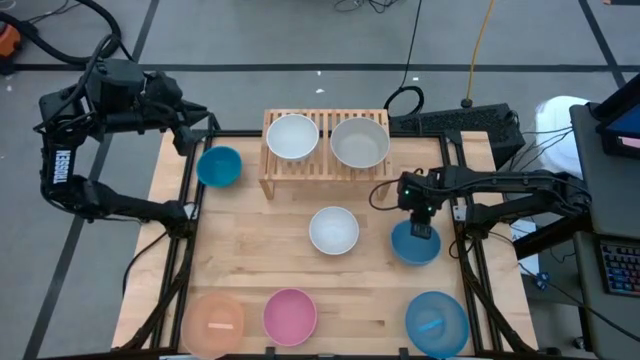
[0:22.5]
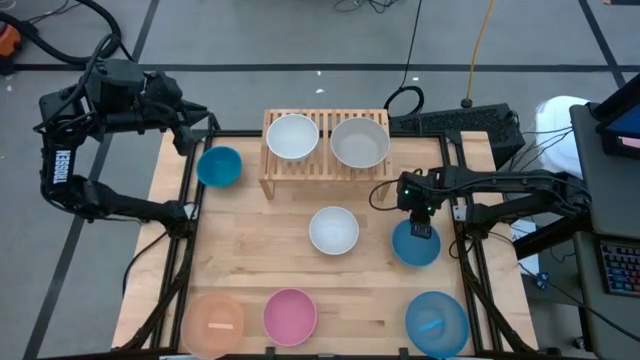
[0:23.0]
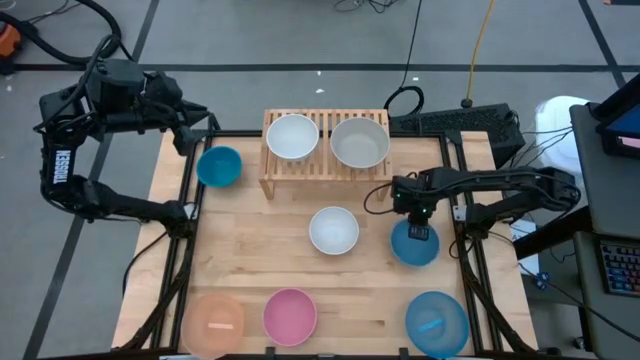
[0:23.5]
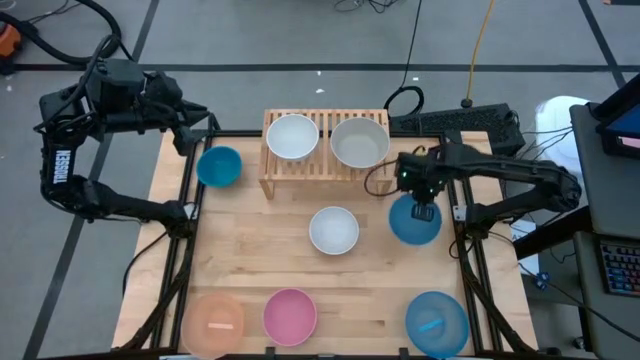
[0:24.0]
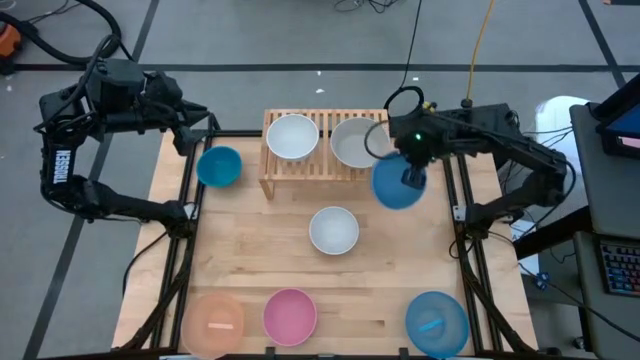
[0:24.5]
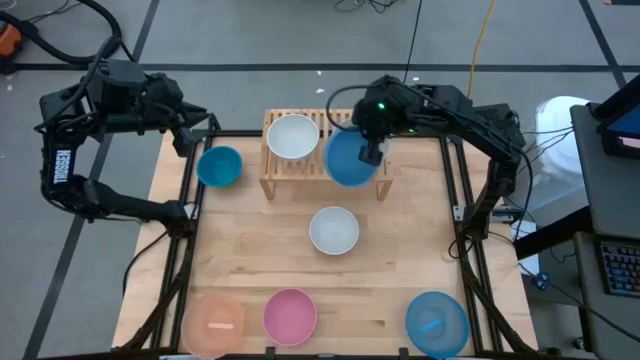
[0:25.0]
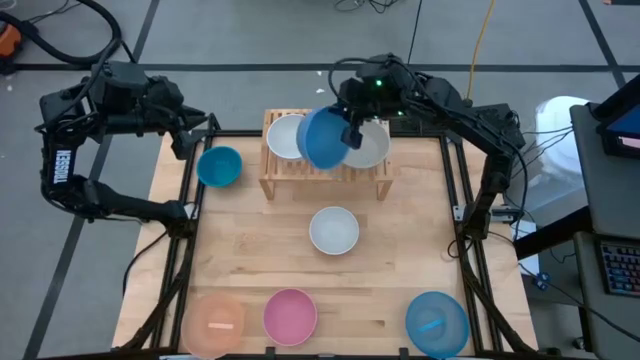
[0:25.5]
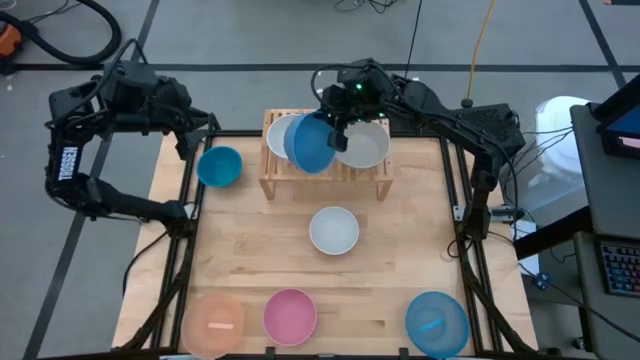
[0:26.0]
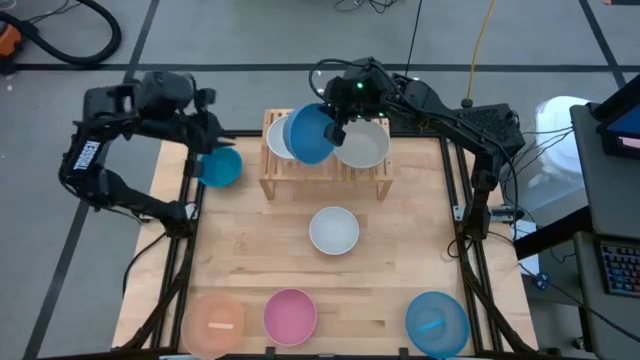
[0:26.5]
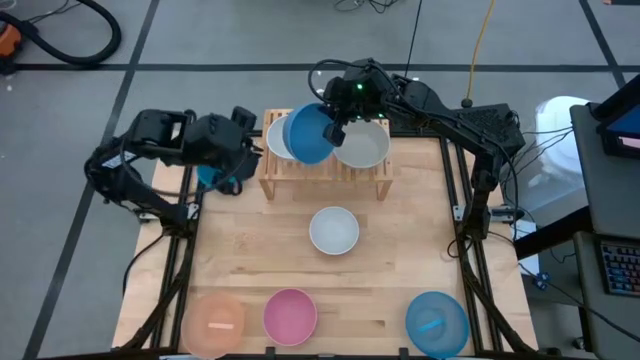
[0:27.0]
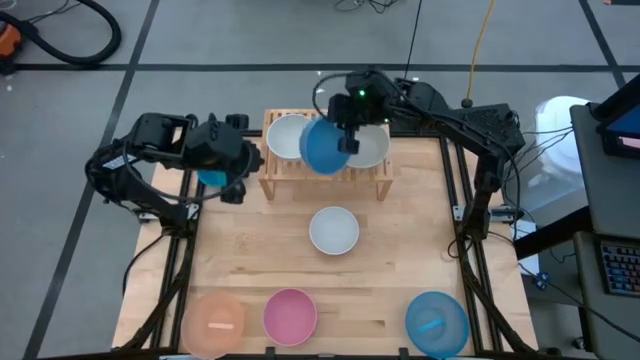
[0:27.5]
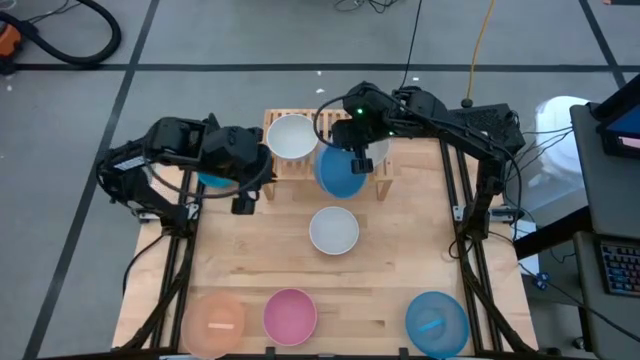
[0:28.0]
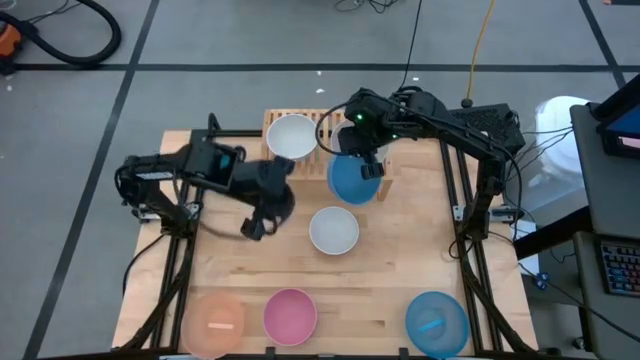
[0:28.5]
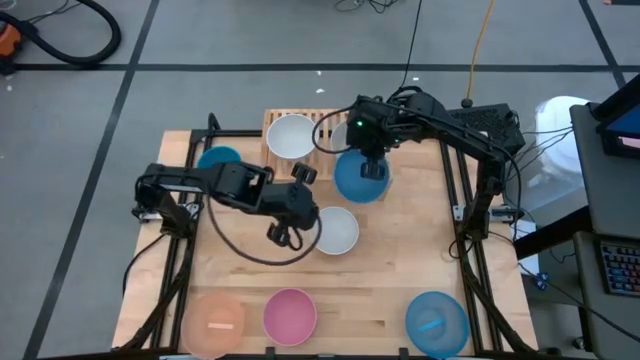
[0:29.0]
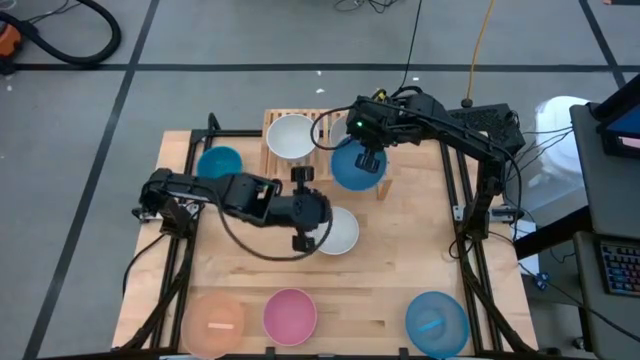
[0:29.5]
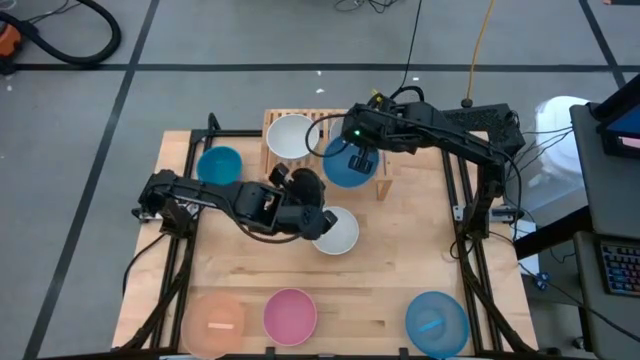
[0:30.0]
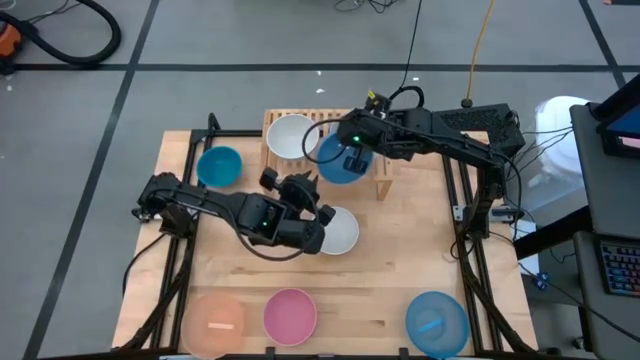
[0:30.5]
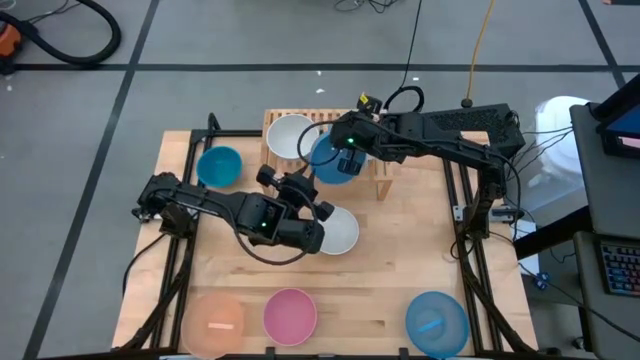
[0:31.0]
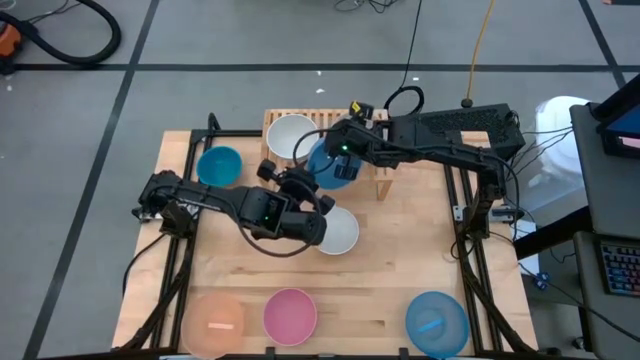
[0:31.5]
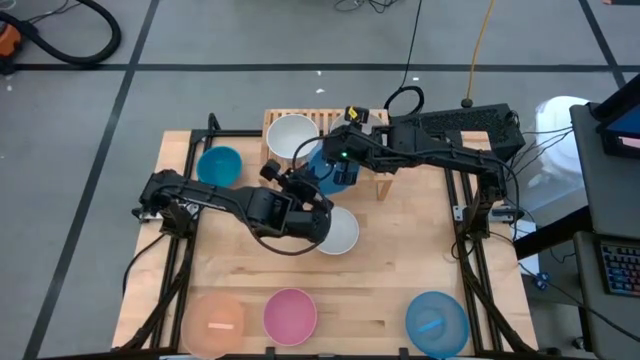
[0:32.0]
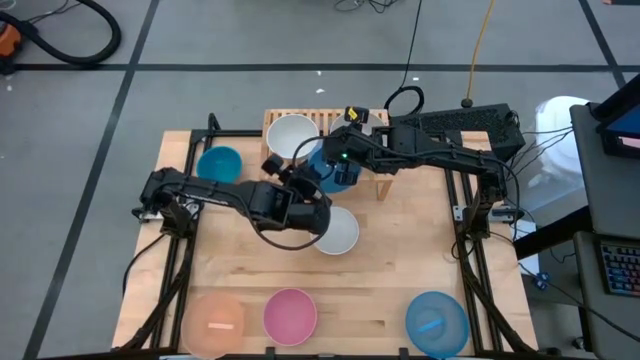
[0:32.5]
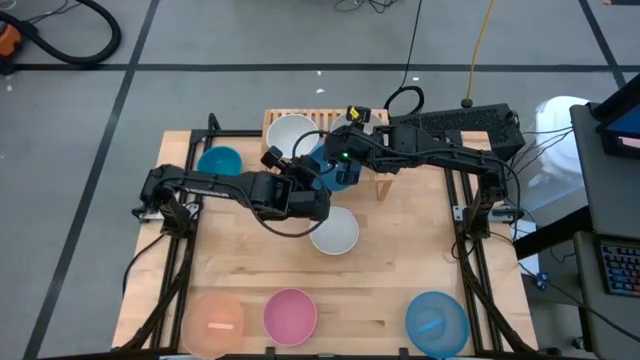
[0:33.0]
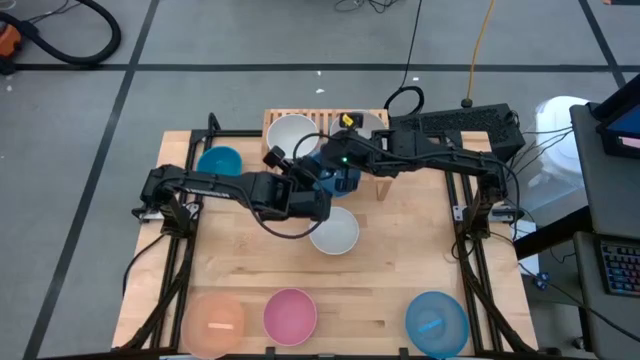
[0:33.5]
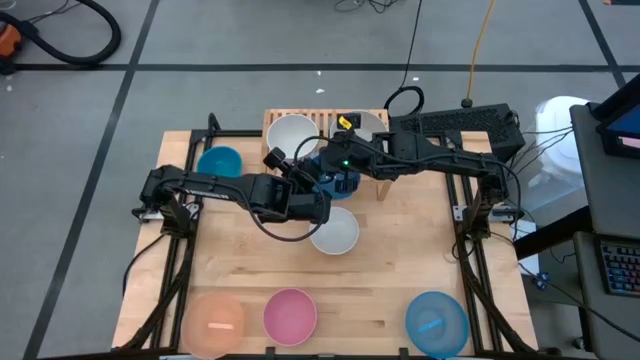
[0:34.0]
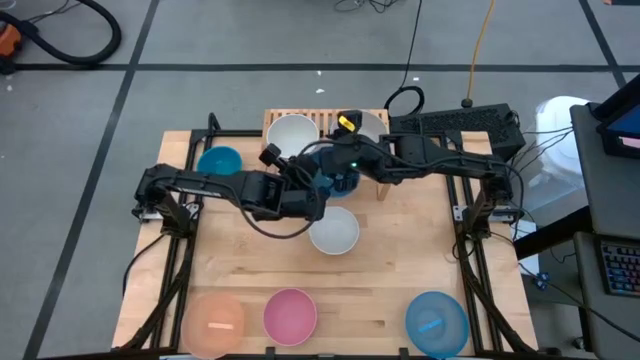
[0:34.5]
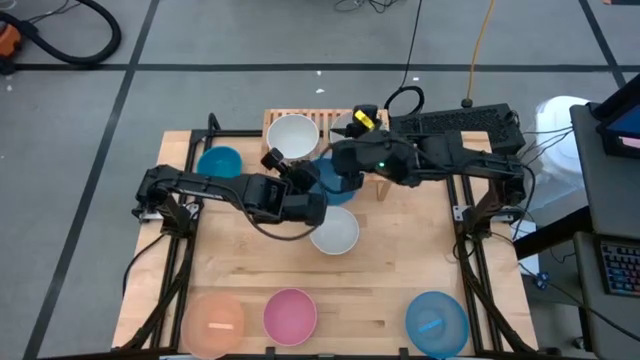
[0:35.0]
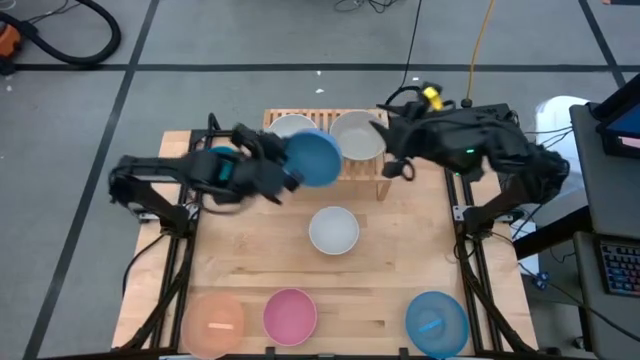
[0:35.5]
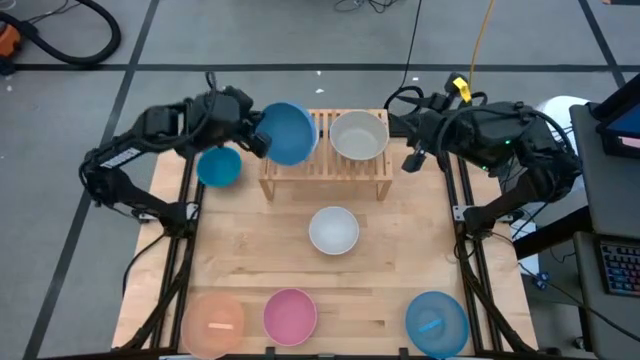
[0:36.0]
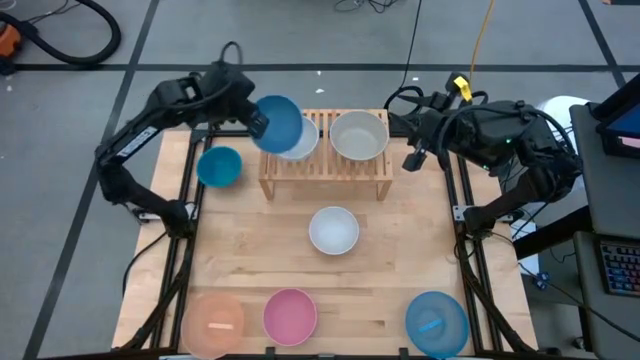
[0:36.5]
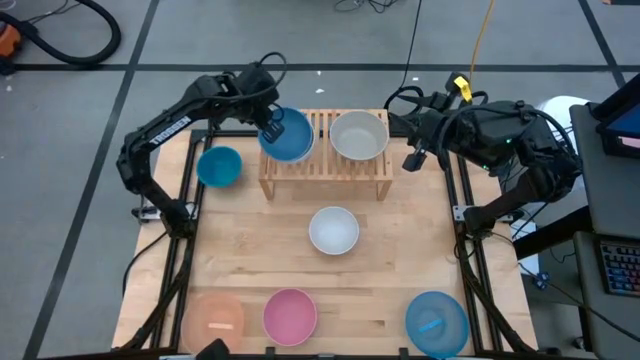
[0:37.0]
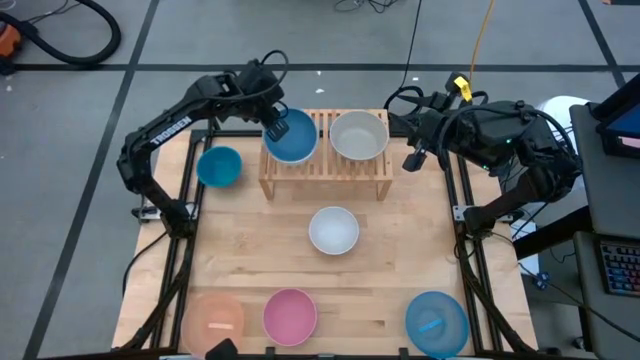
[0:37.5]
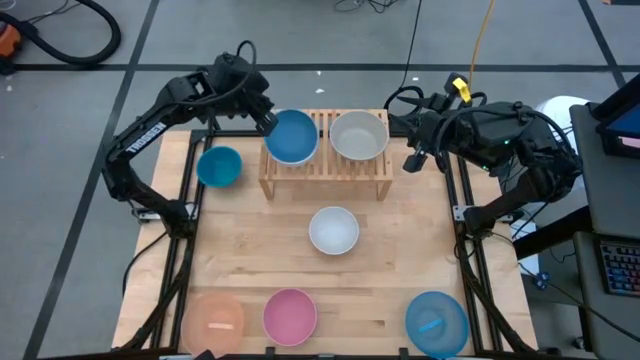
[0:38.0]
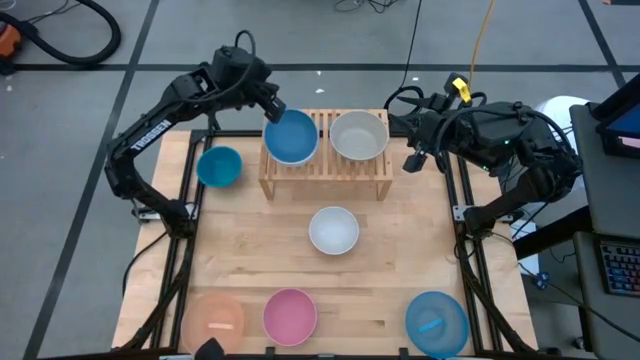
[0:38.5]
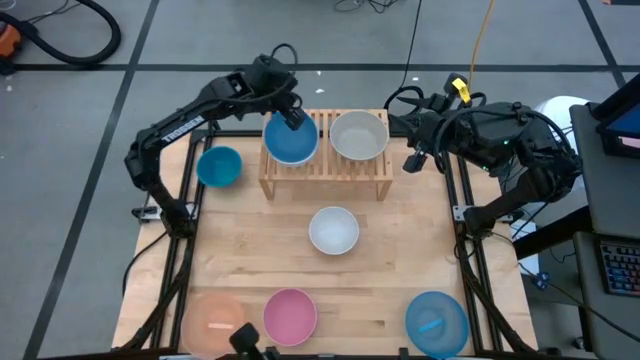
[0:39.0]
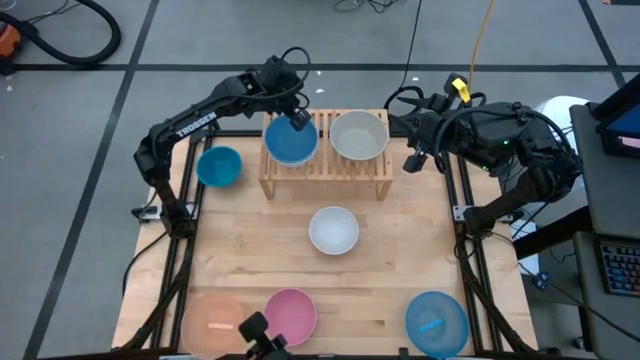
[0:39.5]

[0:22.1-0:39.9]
Task: Place and stack bowls onto a shelf
Stack the bottom small blue bowl on top of the small white bowl on the shelf

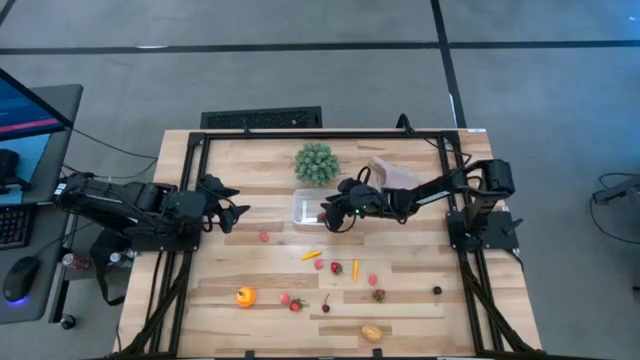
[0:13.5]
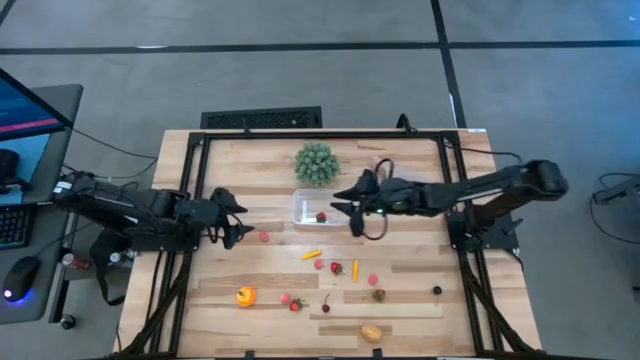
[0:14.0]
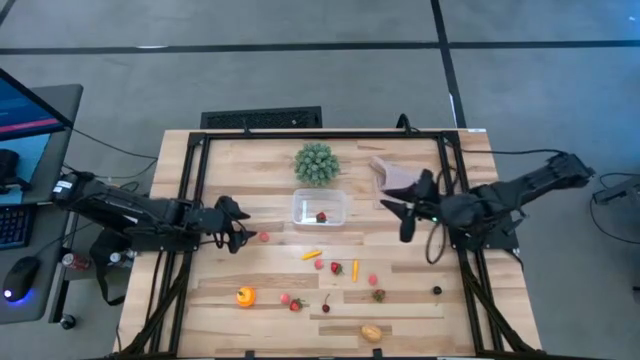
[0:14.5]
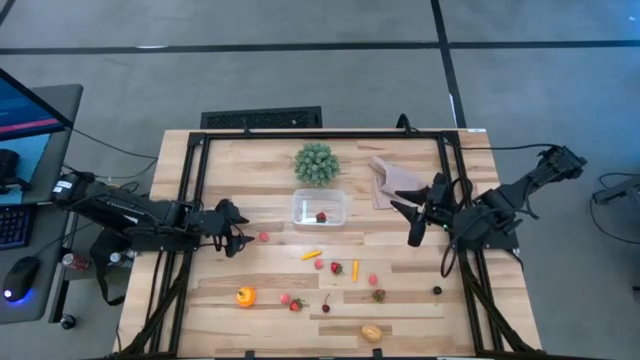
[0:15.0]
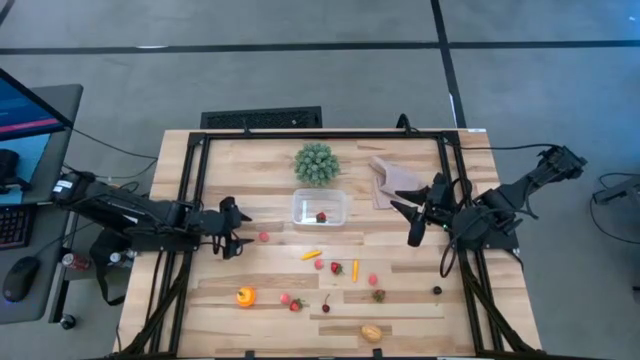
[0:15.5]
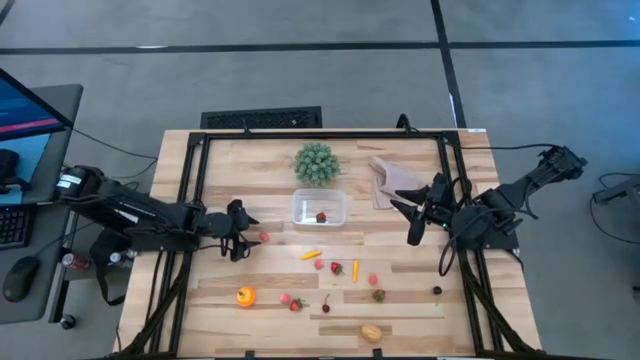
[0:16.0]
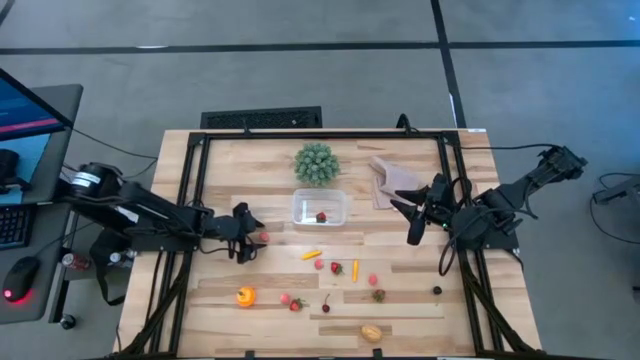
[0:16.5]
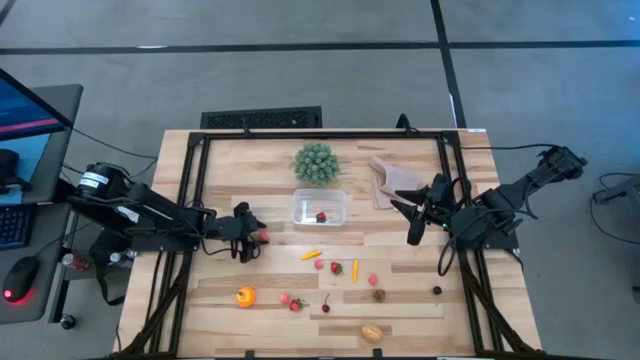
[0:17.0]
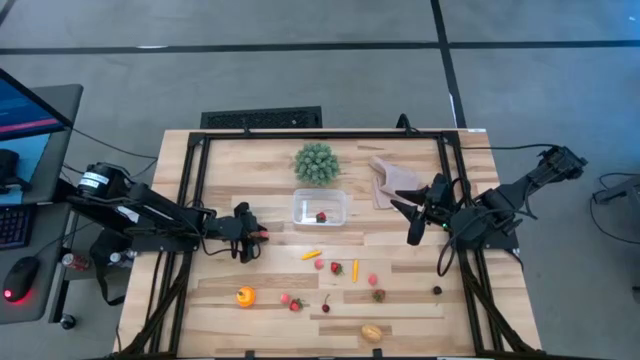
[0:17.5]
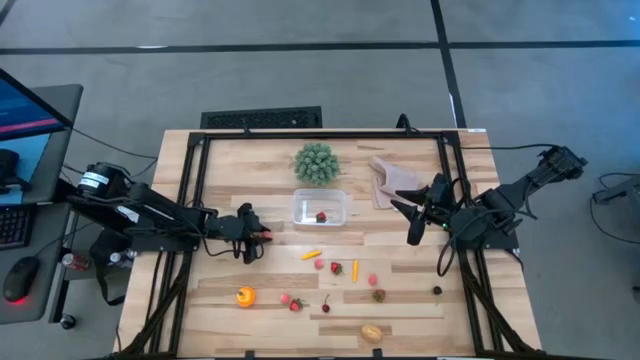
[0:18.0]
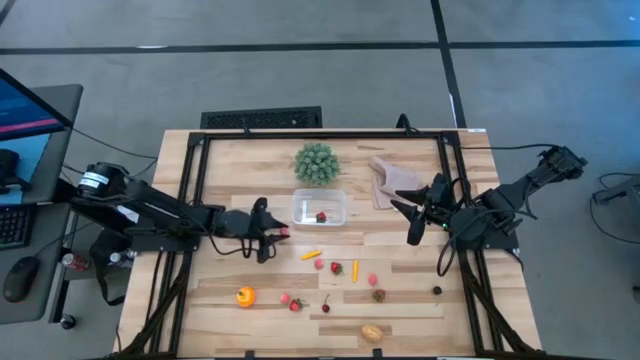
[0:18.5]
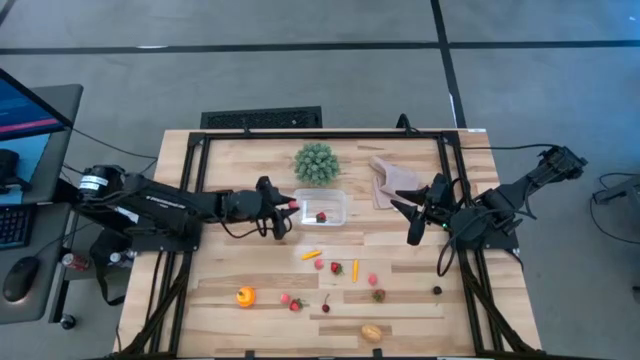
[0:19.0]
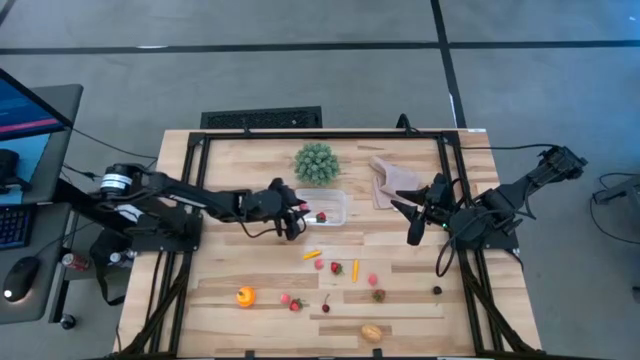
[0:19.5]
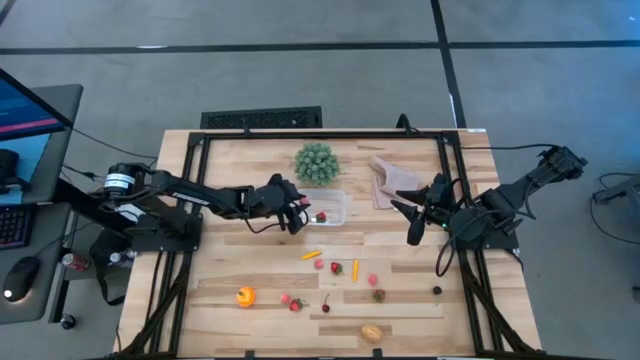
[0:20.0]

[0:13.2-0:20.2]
Task: Pick and placing Produce into tupperware
Put the pink peach into the transparent container
